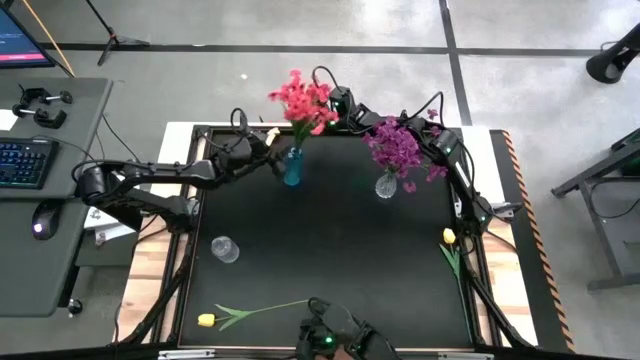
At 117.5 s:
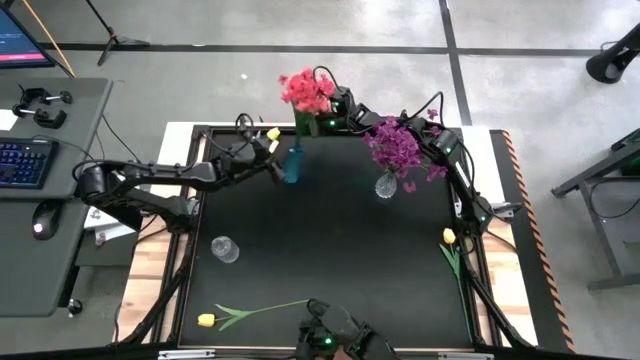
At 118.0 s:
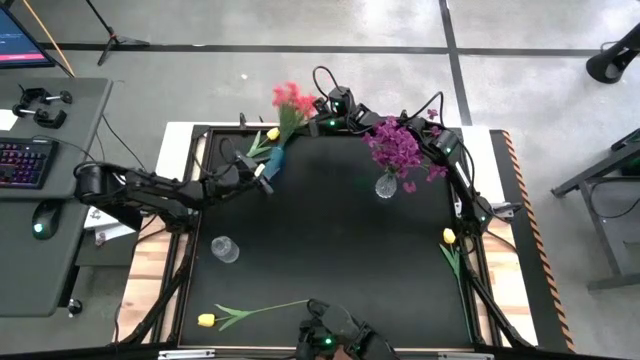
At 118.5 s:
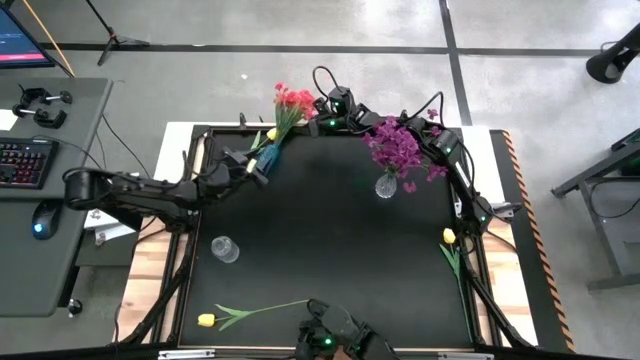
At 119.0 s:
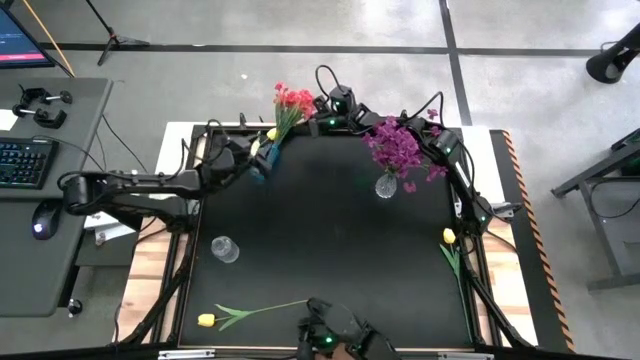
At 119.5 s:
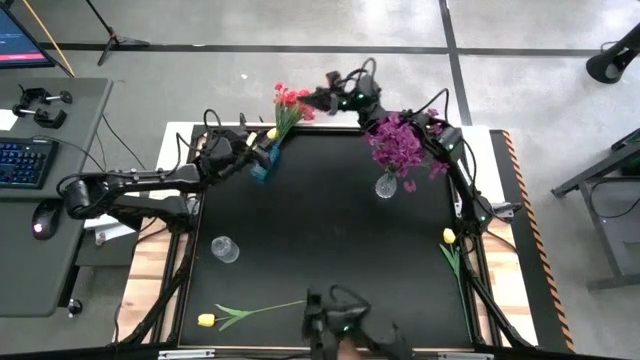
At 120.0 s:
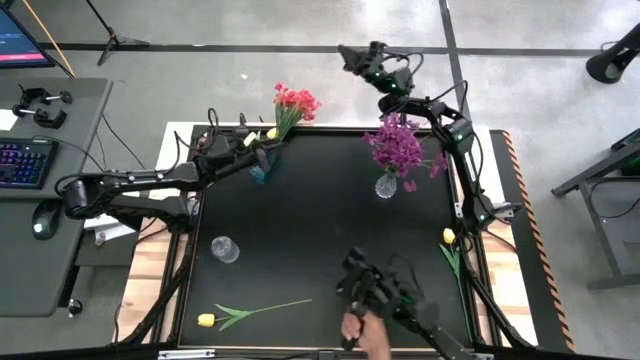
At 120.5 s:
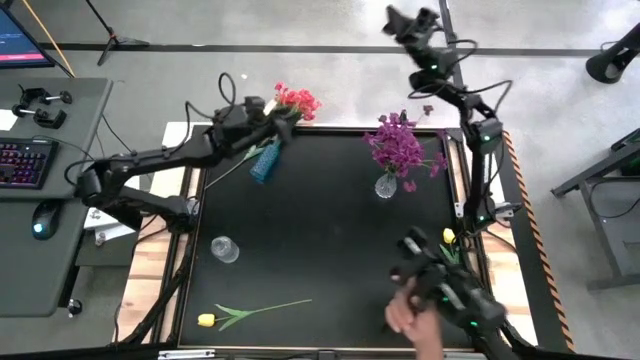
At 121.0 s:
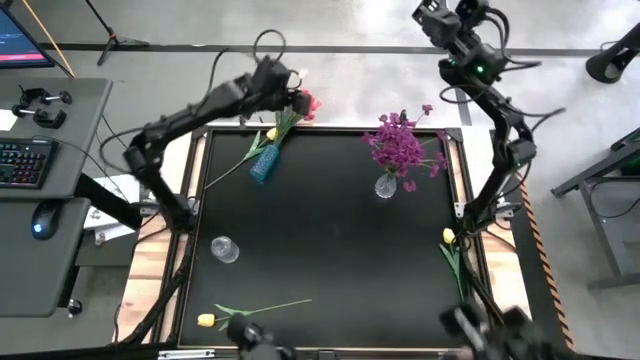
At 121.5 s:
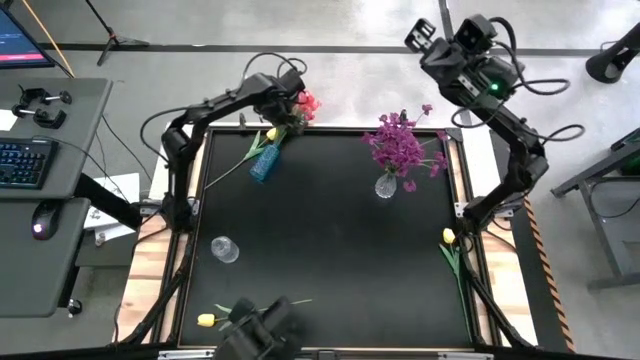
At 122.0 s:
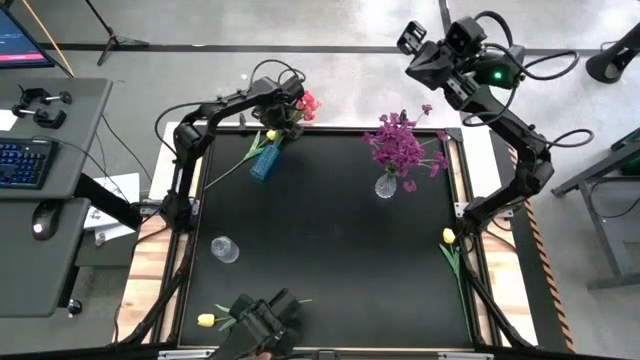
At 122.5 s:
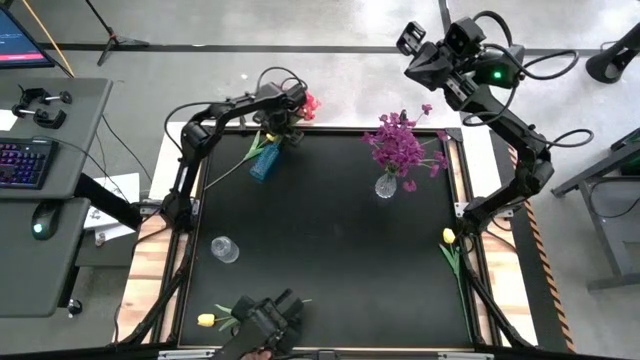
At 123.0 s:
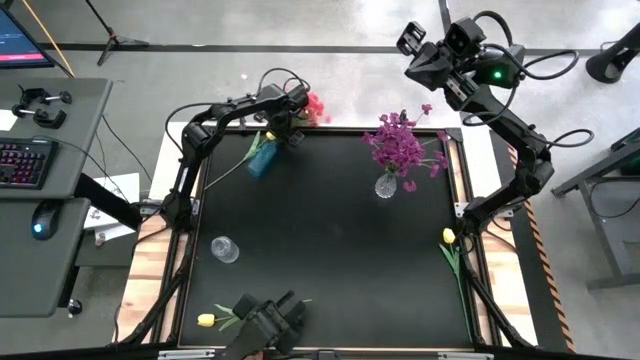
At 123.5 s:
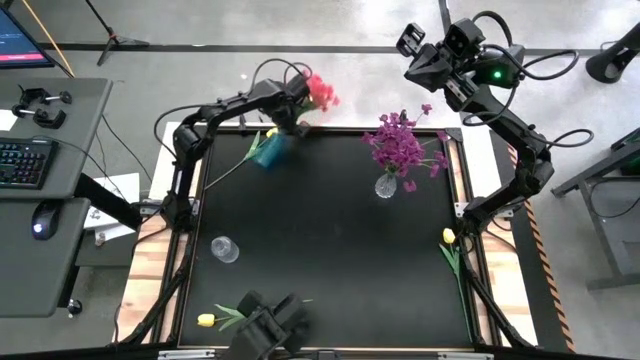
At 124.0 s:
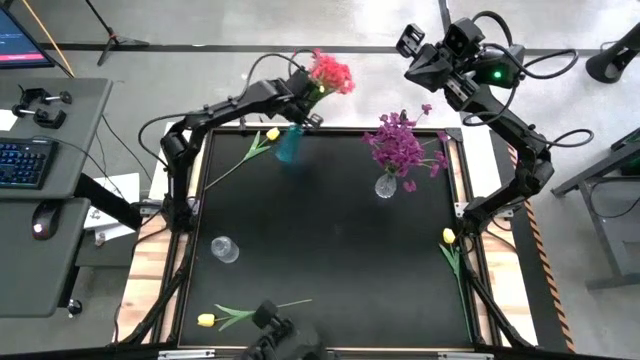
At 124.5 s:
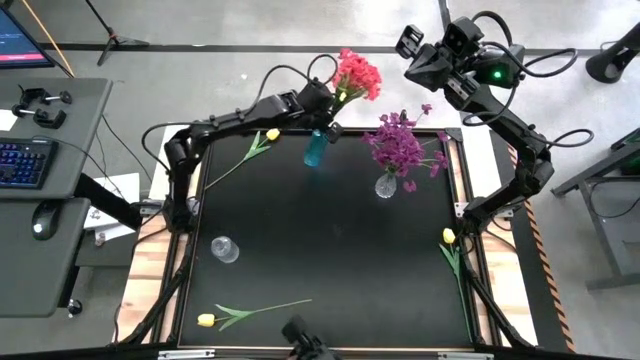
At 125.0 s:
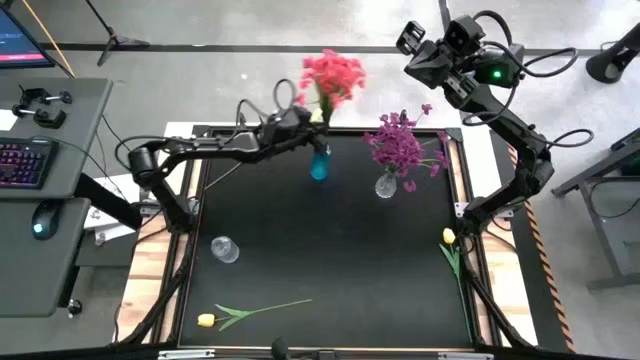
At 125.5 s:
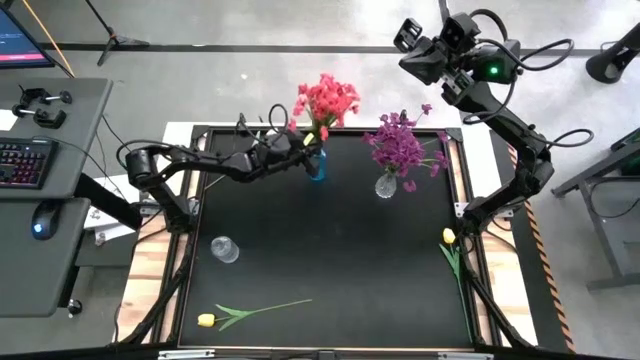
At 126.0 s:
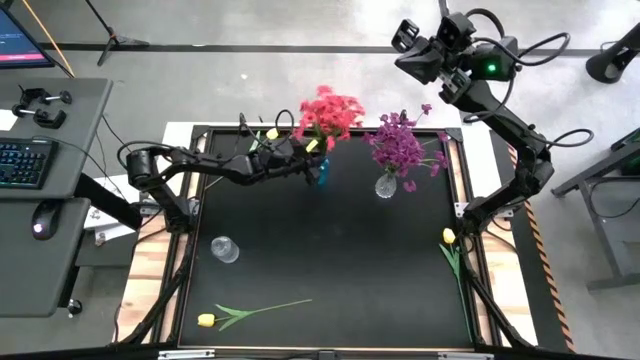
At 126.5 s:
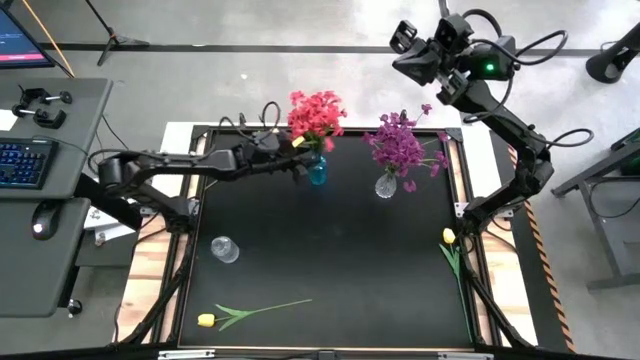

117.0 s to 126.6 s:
Task: Sort flowers into vase by color
Adjust the blue vase on the table

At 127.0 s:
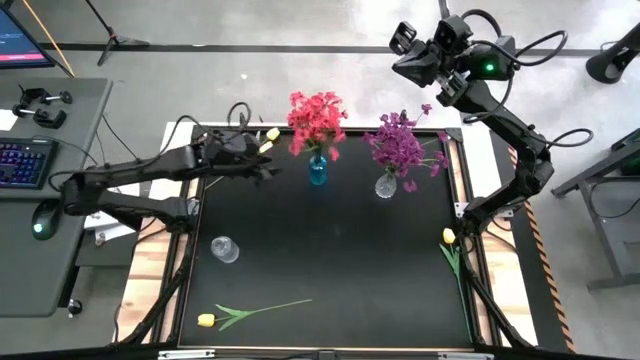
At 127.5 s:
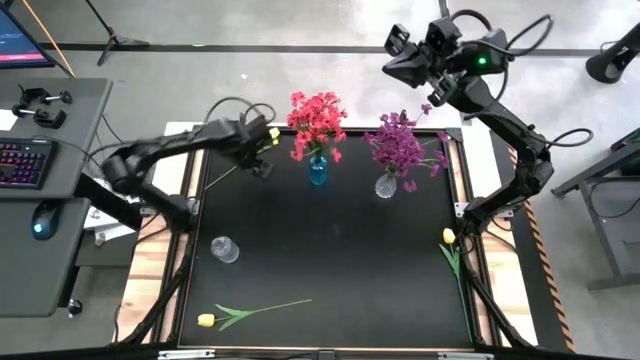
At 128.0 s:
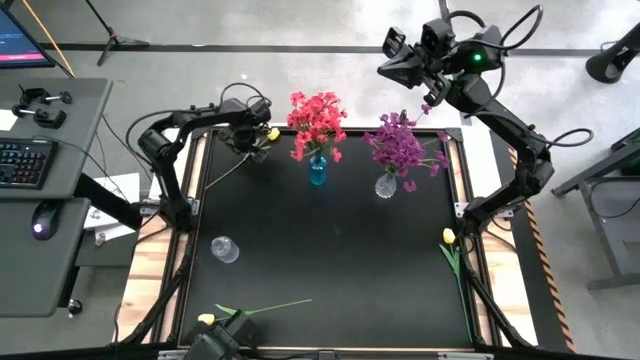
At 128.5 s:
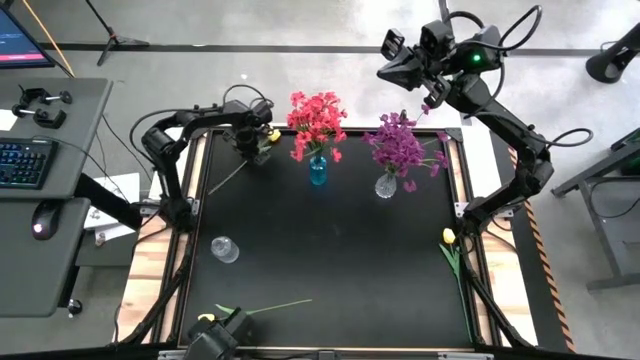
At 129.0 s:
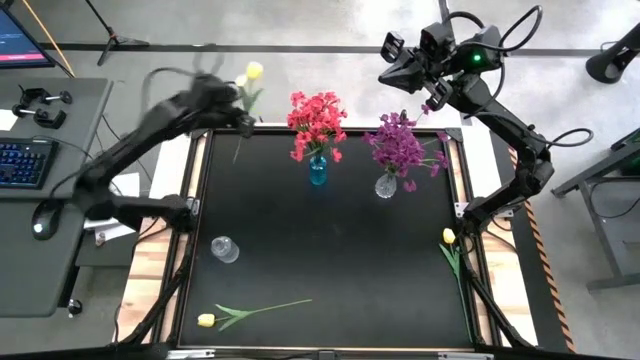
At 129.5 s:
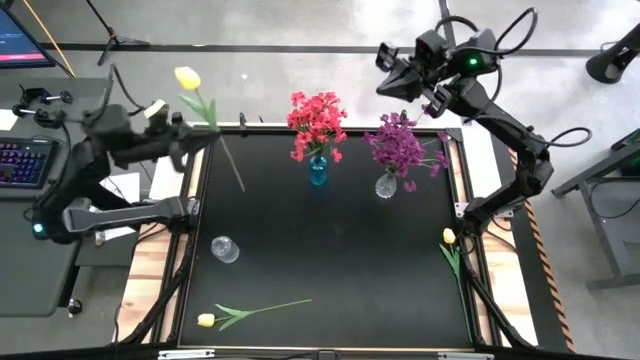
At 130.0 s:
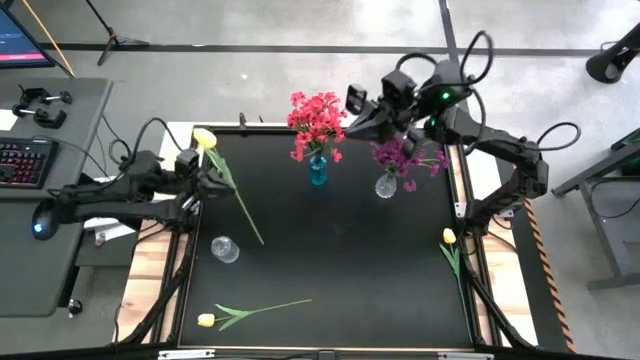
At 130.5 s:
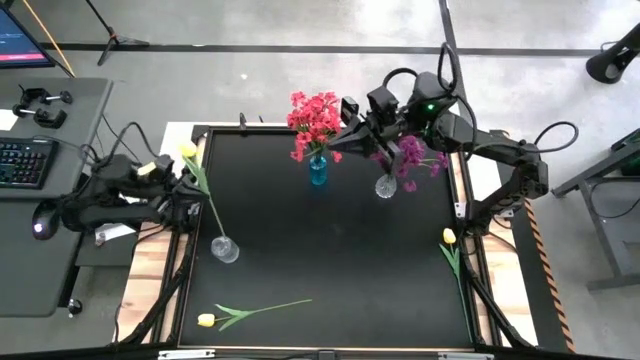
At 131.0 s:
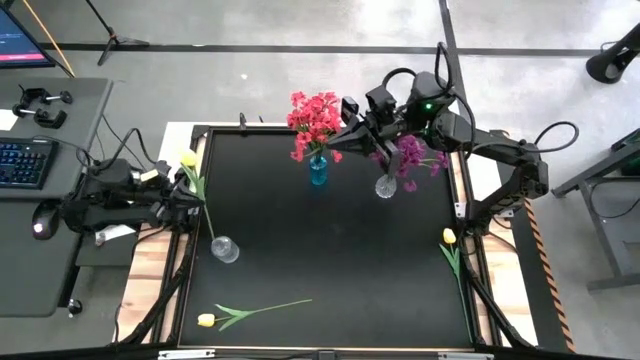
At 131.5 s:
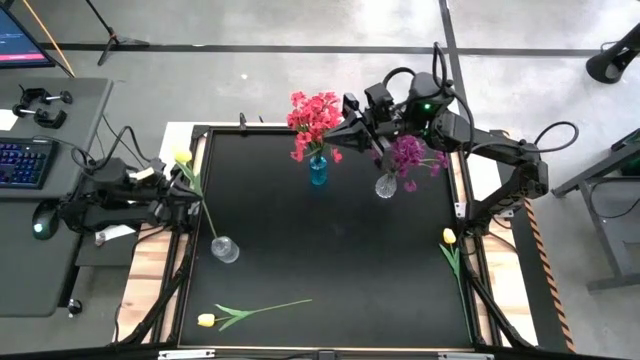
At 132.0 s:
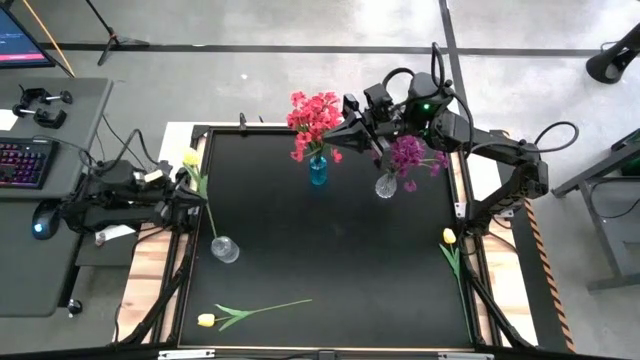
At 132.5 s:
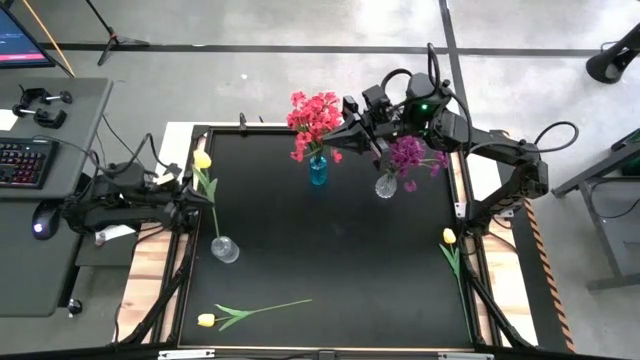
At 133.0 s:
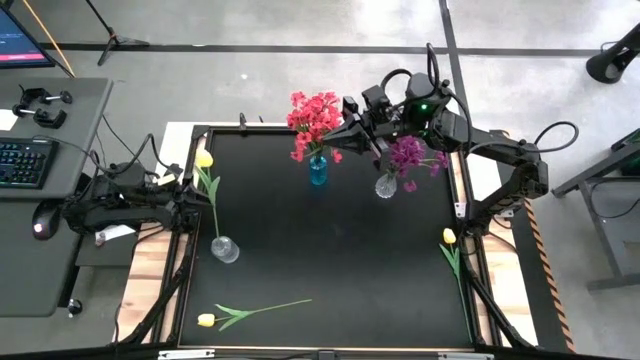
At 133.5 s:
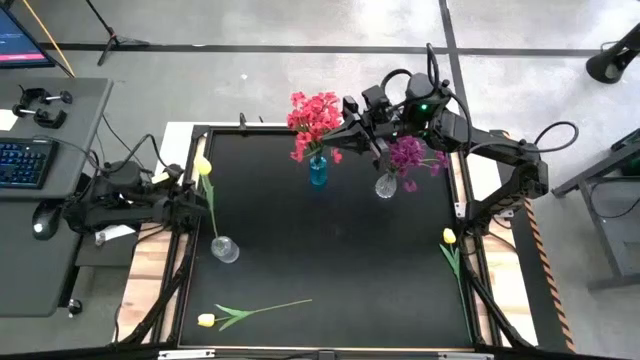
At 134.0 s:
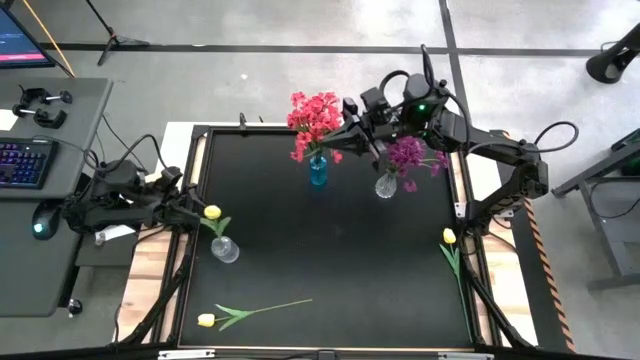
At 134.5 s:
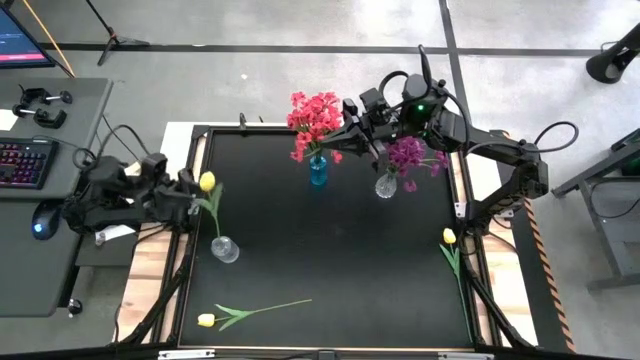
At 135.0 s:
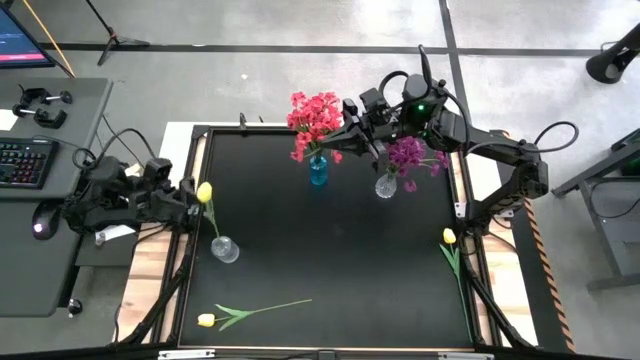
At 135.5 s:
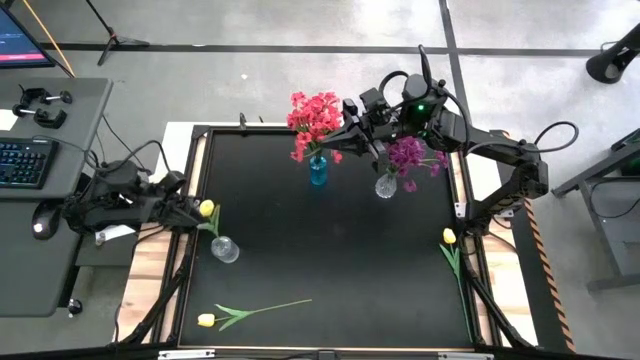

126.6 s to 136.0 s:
Put the top yellow flower into the bottom transparent vase
